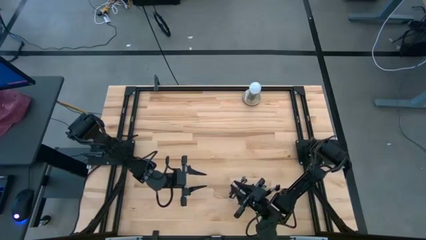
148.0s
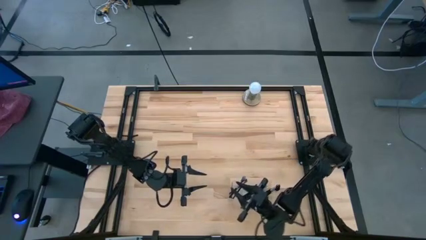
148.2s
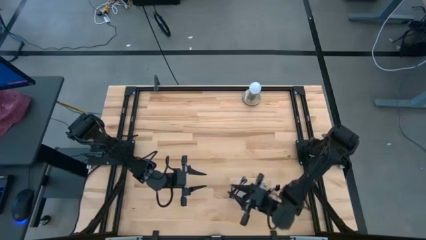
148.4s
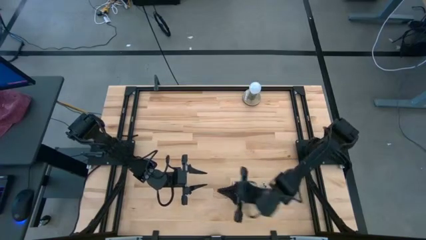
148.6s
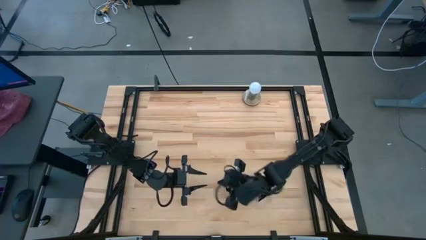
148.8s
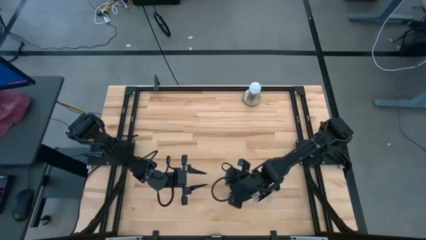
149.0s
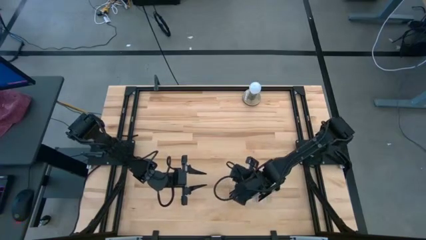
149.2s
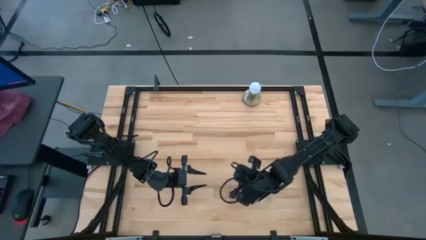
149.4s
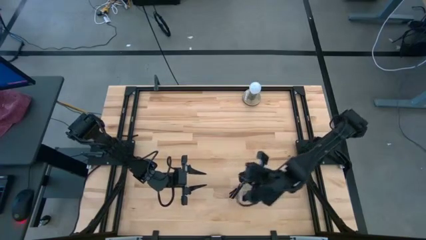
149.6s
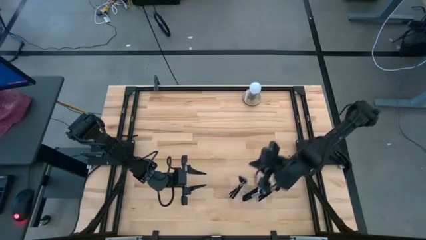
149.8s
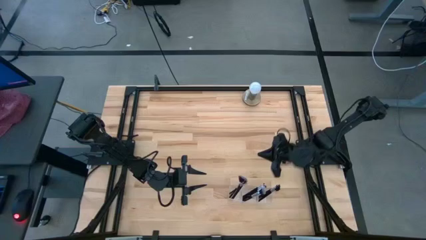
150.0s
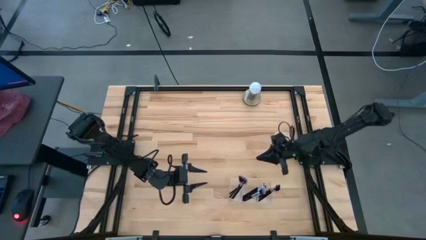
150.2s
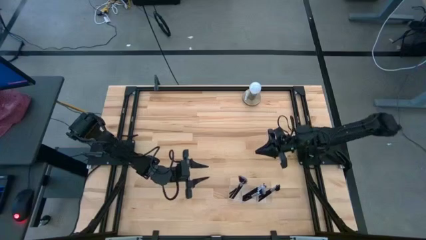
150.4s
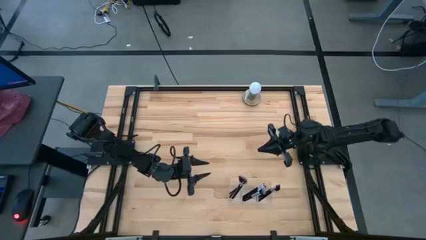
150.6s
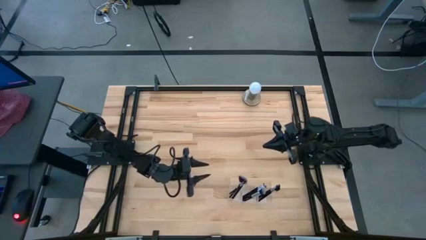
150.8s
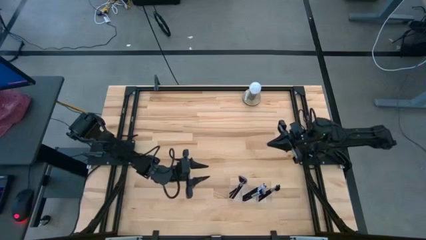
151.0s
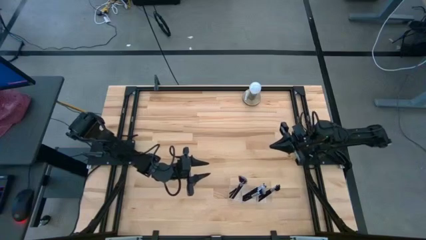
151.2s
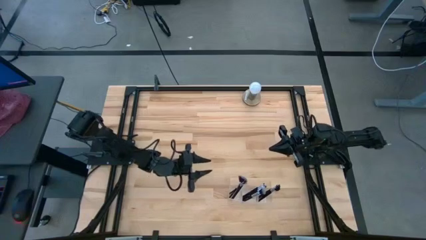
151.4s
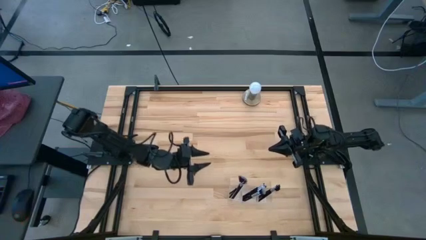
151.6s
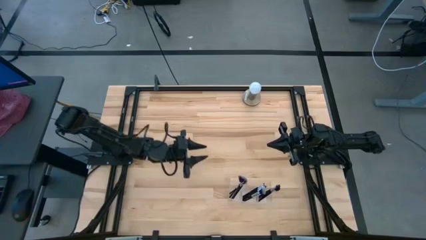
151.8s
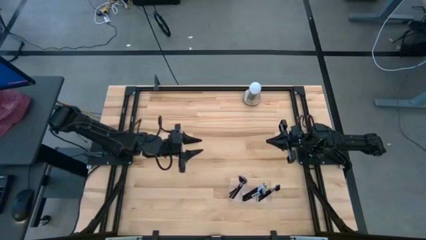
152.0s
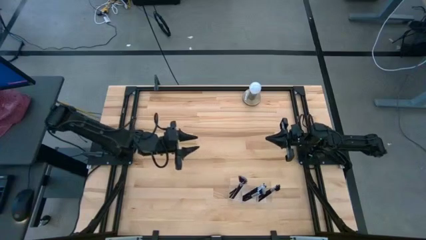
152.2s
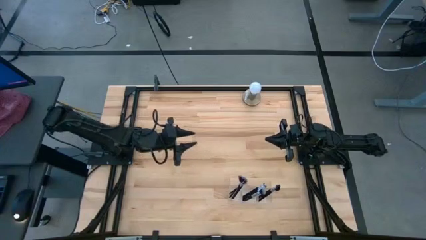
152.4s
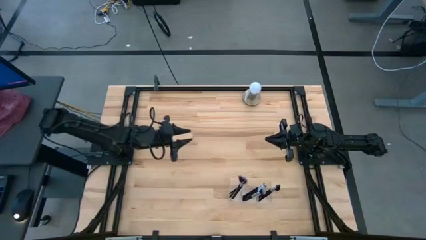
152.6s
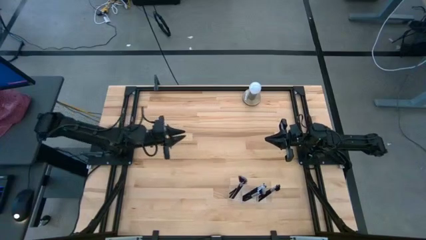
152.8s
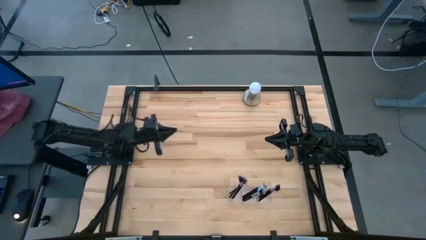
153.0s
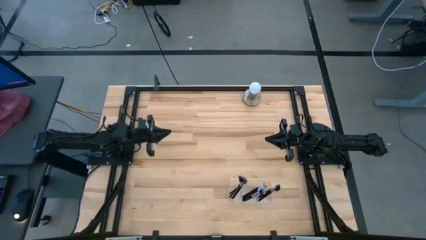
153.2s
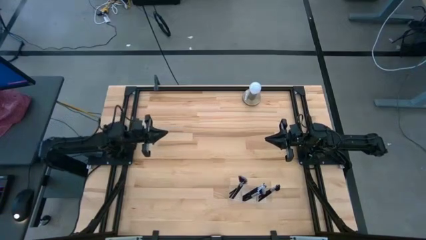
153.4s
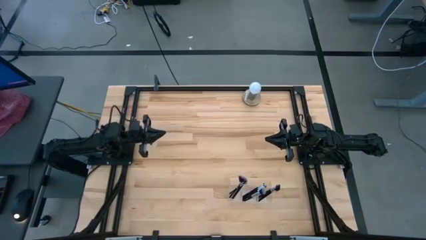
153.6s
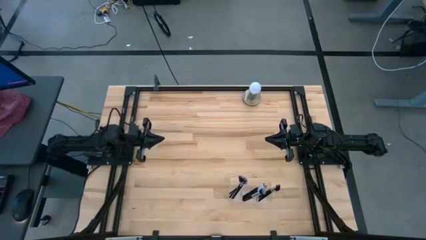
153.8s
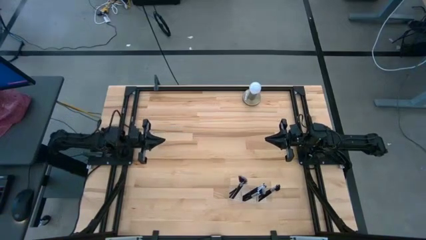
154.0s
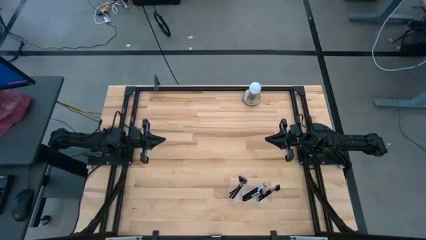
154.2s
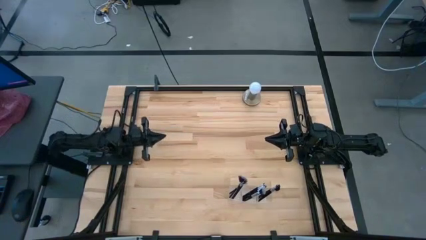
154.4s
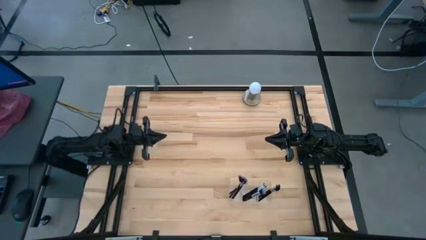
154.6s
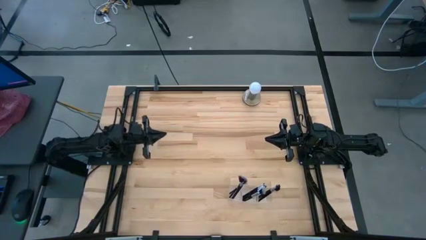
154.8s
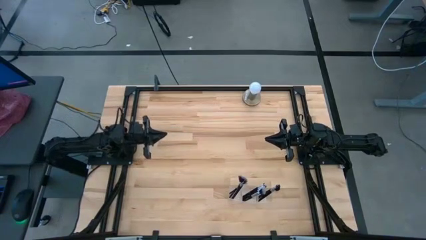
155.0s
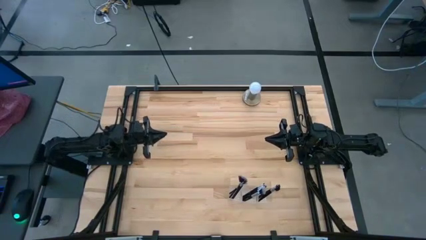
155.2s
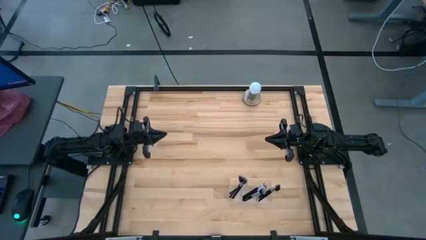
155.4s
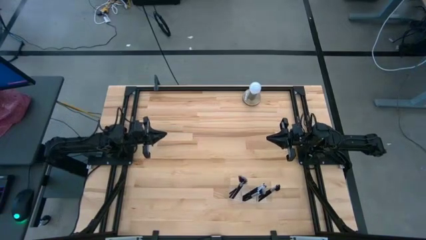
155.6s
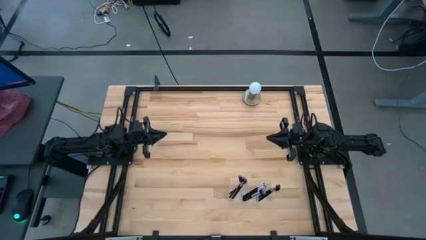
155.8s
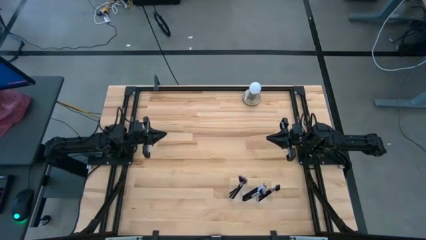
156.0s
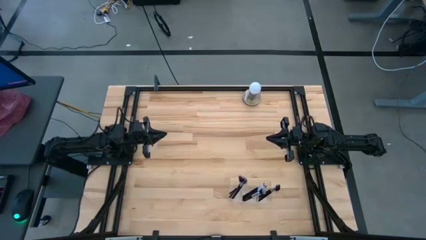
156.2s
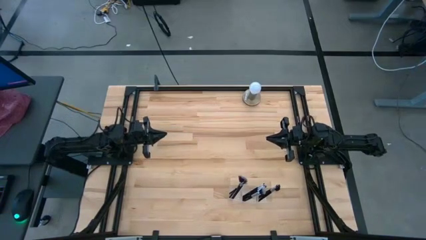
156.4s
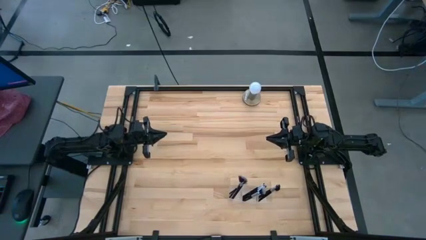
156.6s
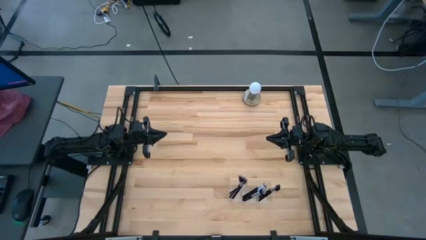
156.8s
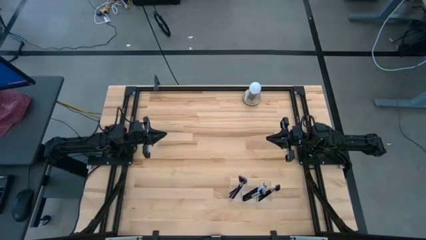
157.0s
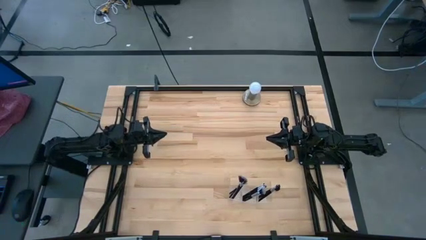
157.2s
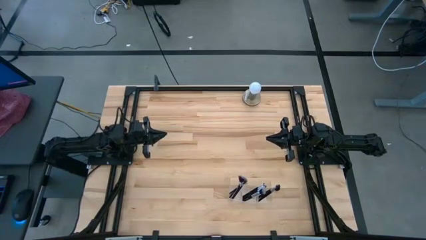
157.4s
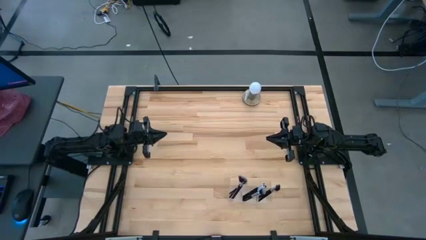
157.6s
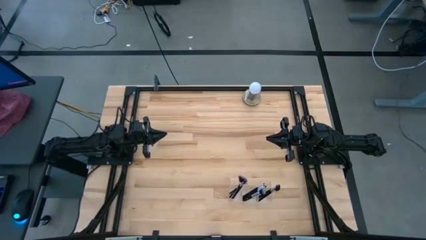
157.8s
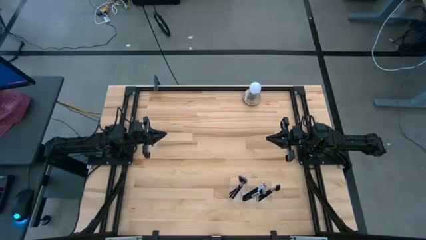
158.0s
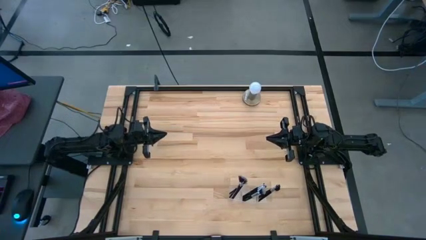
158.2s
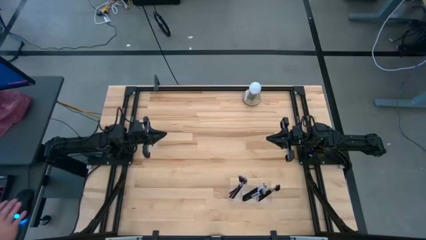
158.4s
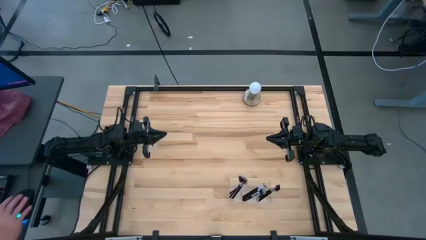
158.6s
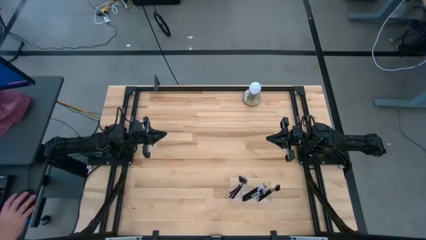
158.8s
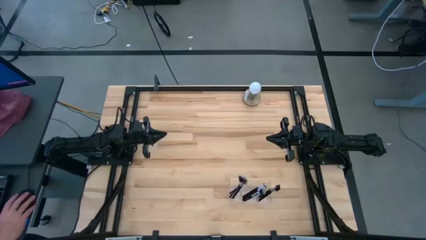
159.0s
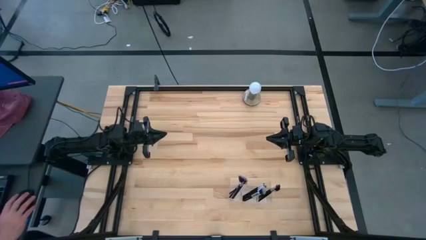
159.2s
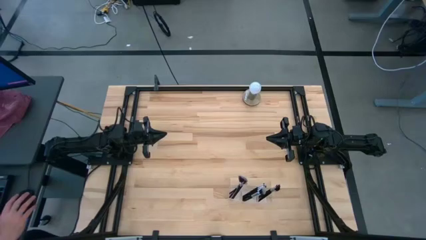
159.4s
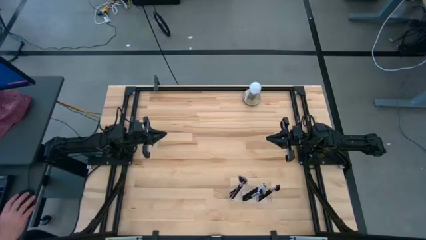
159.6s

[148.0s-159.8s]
Task: Put items in baskets/containers
Return to Home Position

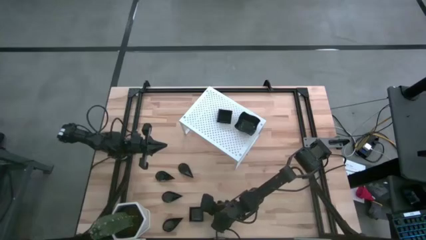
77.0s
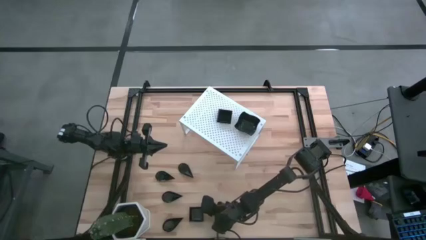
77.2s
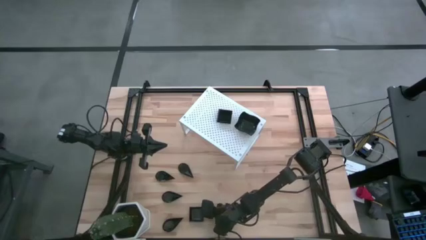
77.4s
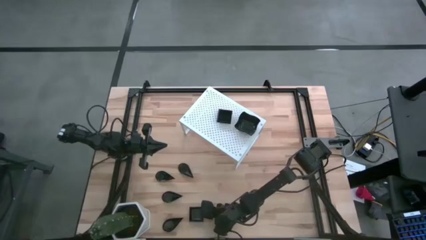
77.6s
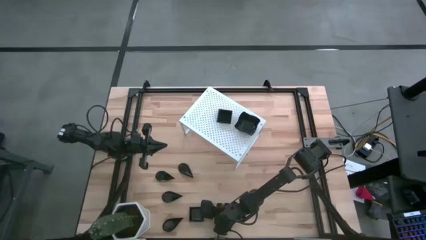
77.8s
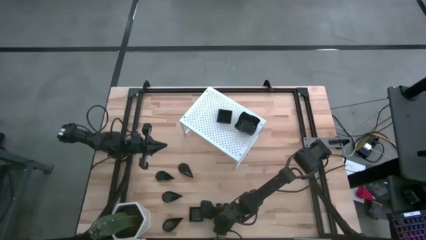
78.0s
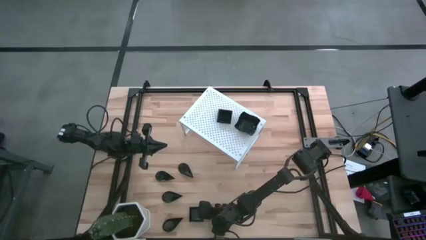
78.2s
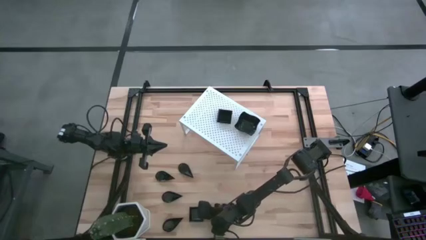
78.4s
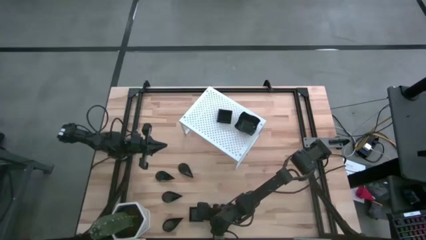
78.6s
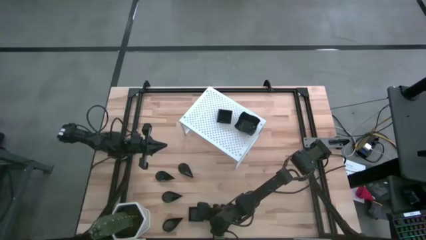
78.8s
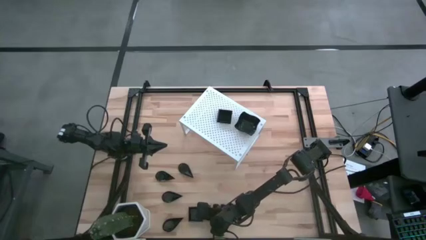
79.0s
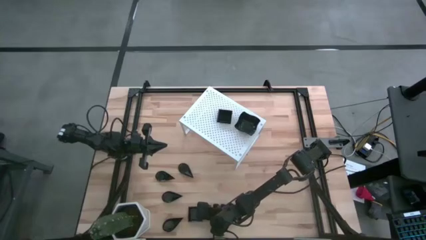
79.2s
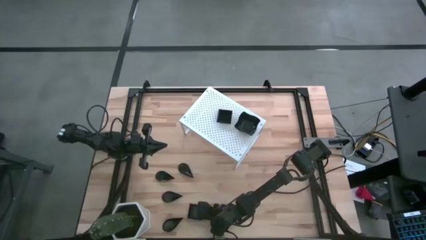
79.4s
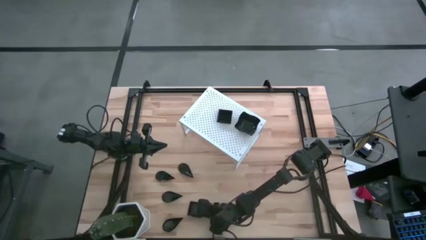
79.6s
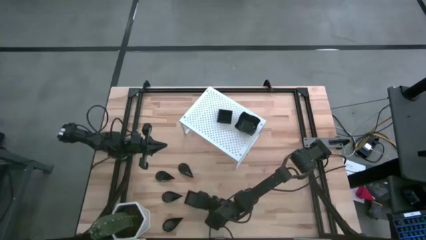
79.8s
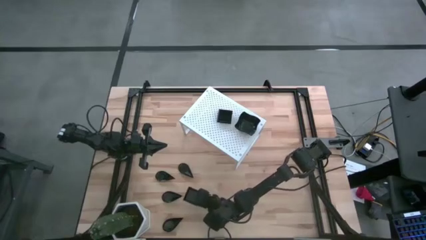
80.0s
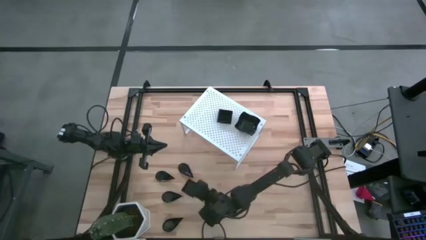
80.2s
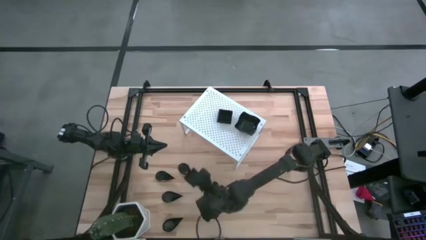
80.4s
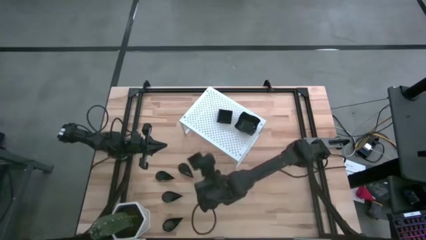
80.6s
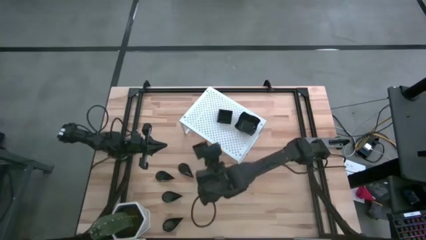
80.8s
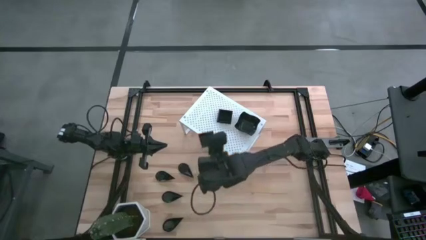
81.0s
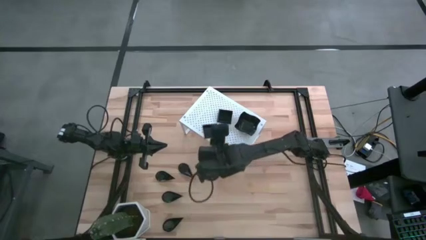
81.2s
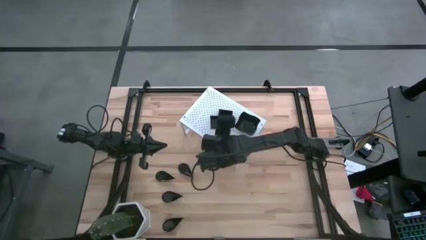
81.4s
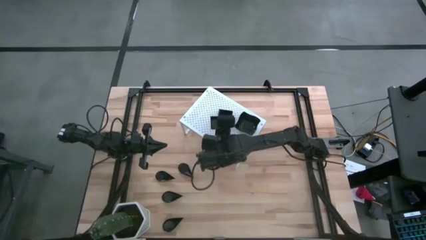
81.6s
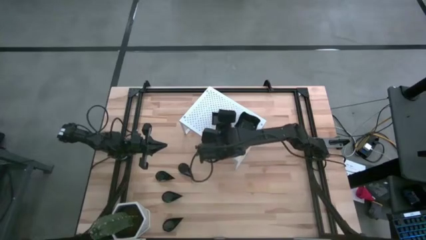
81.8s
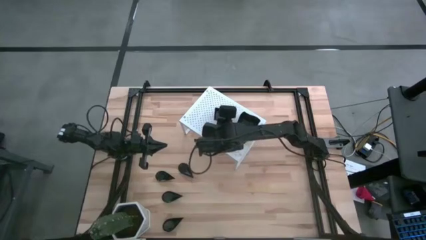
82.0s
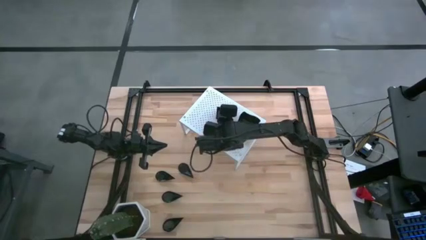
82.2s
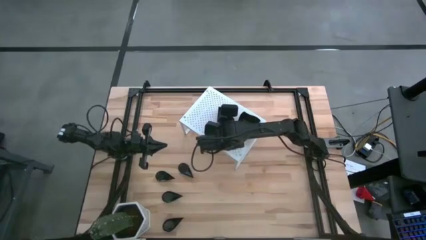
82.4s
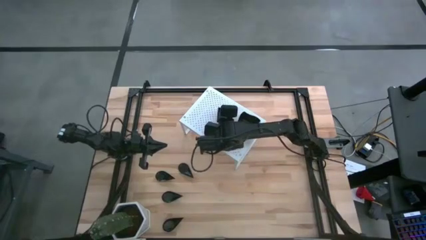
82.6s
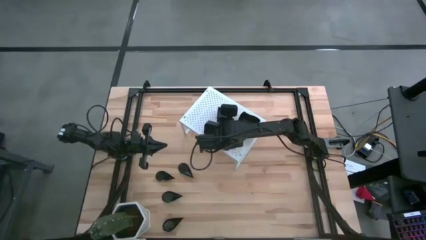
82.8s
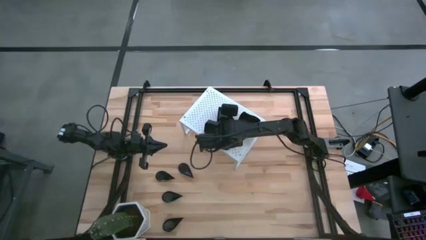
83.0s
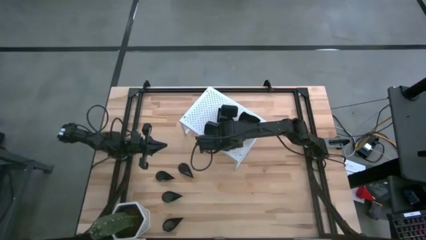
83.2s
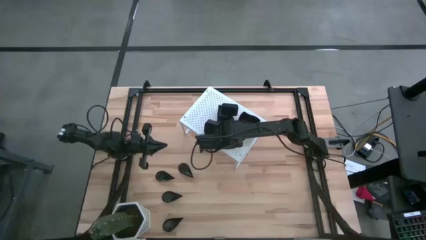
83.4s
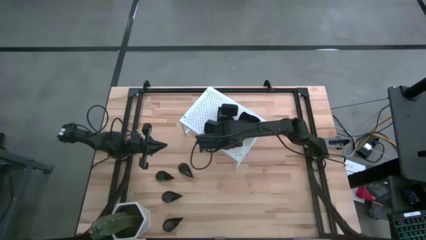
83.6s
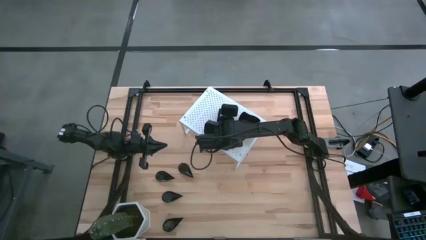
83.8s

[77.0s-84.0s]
Task: Pick & Place Mini shaped plates
Stack the square plate on top of the other square plates on the shelf
